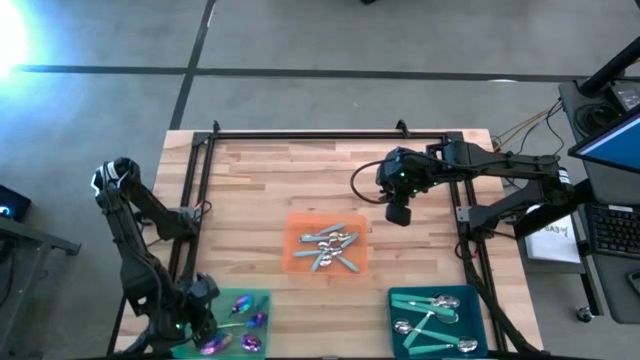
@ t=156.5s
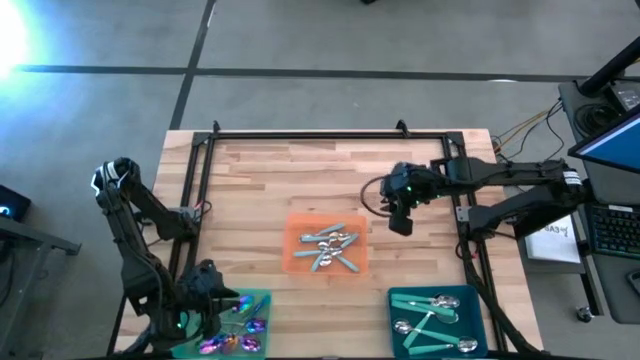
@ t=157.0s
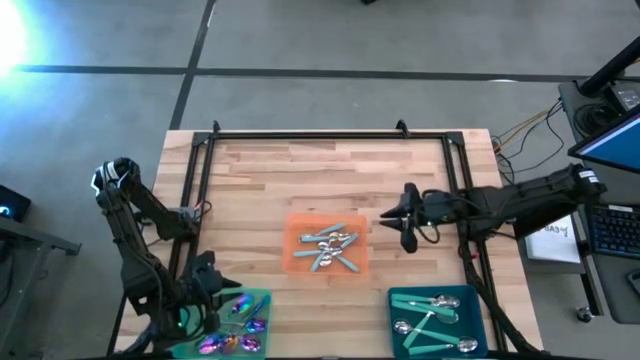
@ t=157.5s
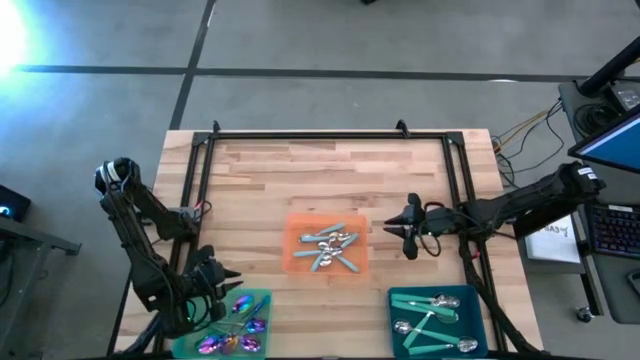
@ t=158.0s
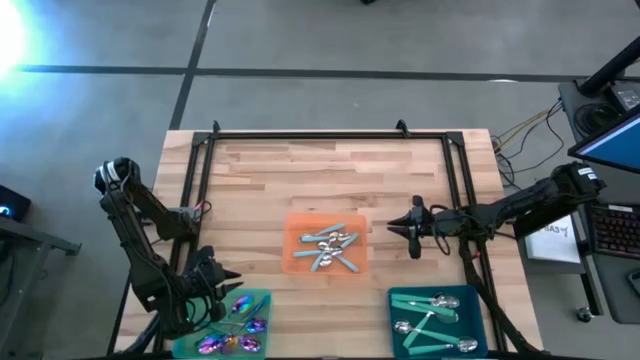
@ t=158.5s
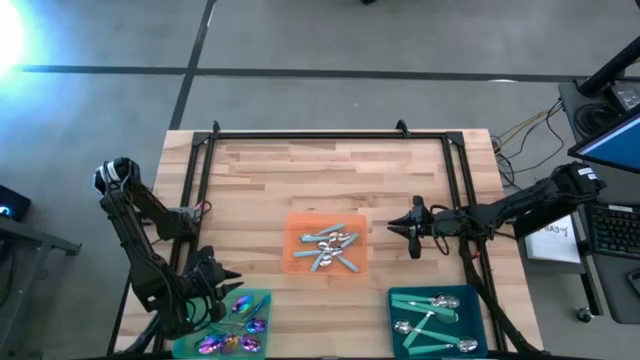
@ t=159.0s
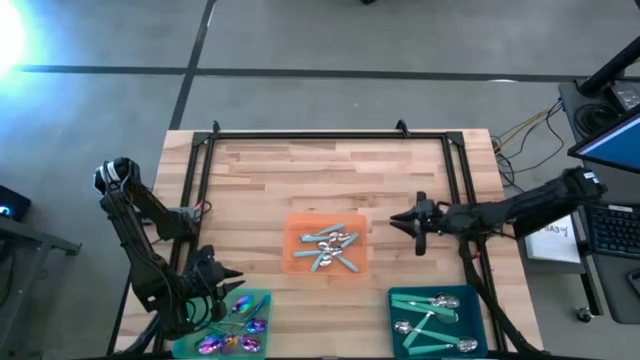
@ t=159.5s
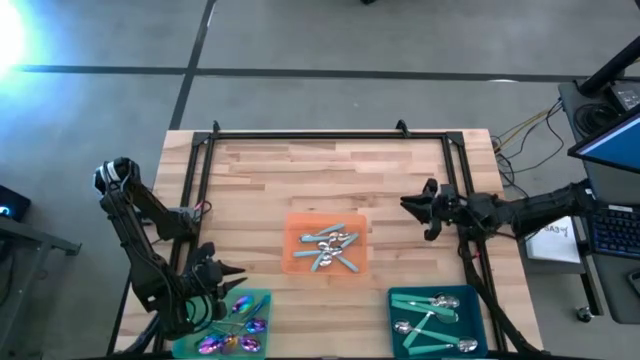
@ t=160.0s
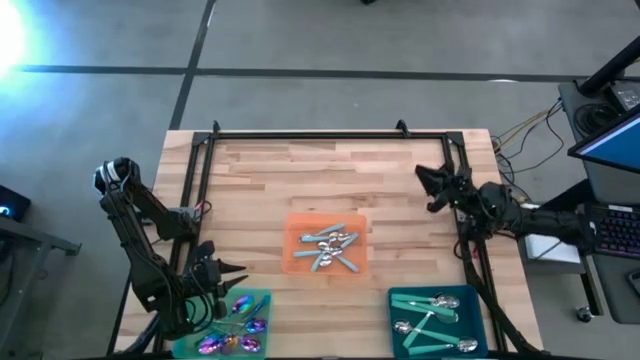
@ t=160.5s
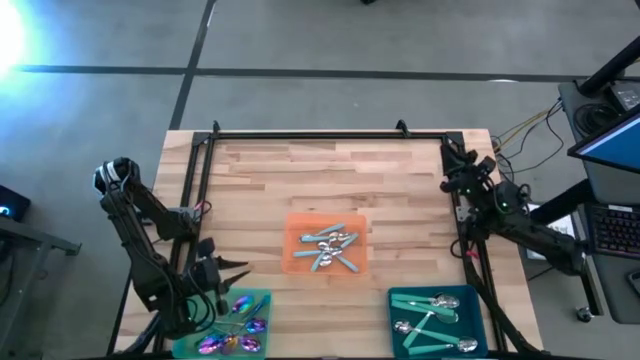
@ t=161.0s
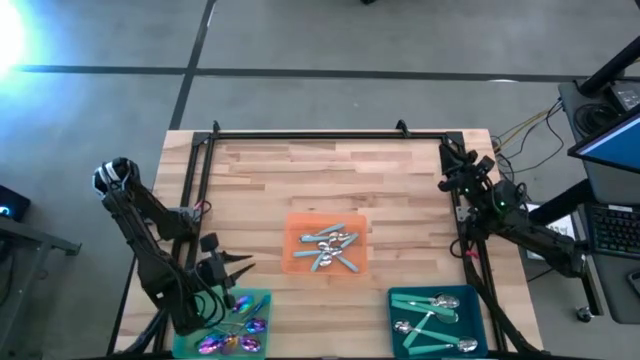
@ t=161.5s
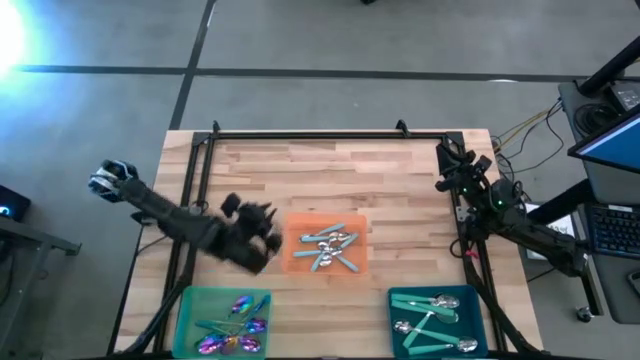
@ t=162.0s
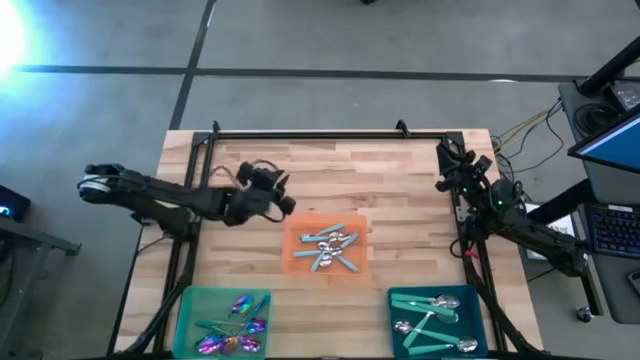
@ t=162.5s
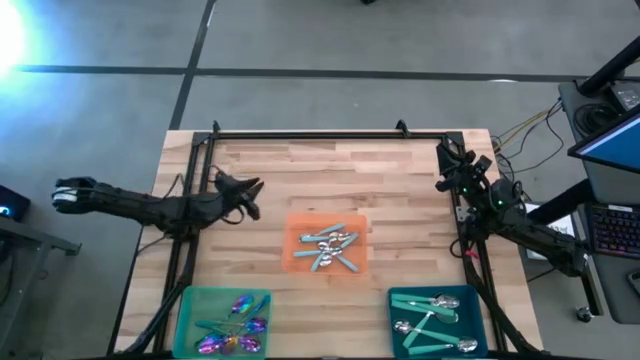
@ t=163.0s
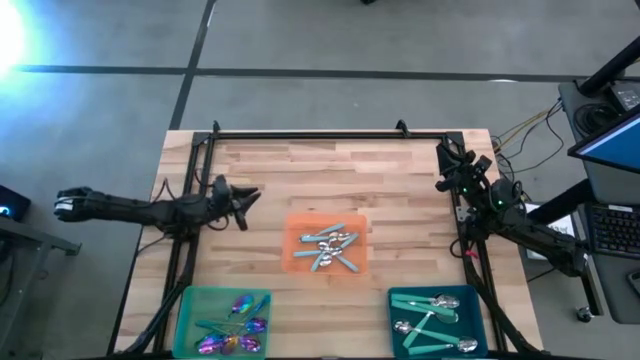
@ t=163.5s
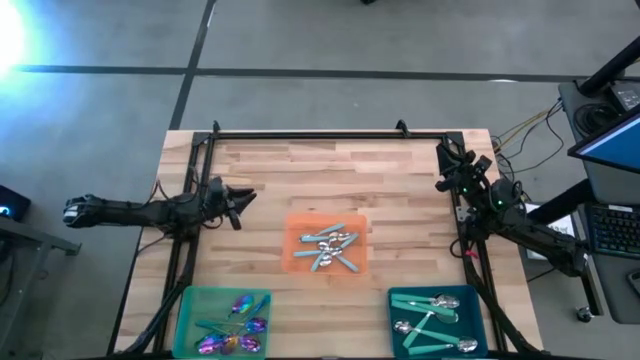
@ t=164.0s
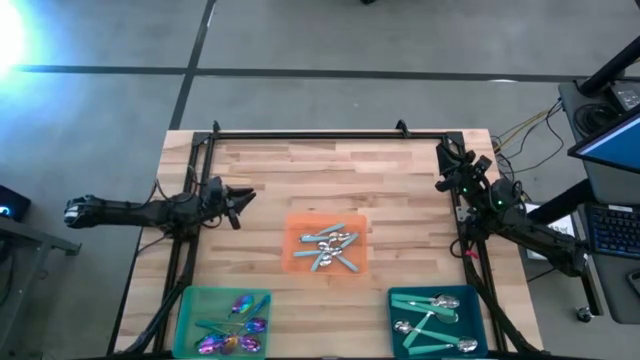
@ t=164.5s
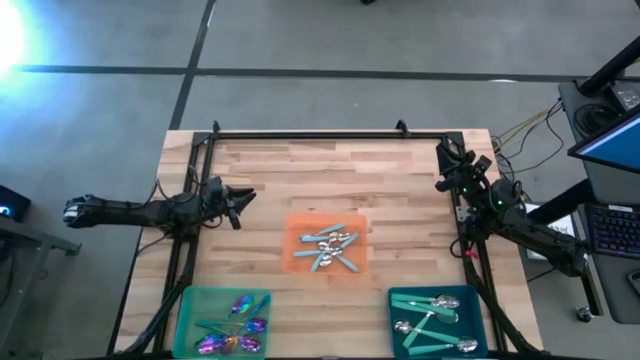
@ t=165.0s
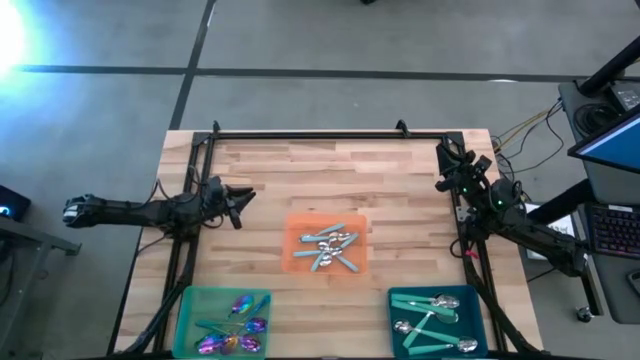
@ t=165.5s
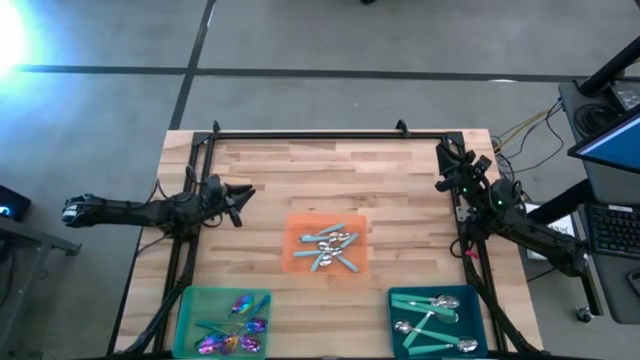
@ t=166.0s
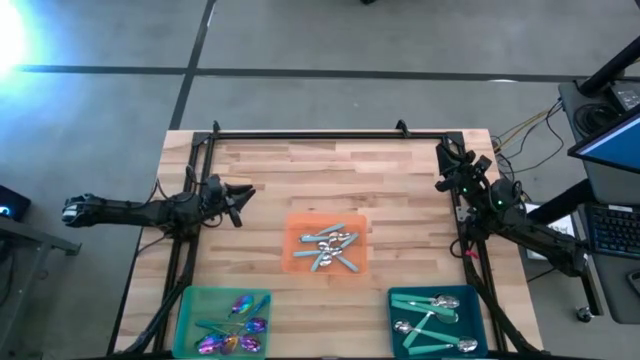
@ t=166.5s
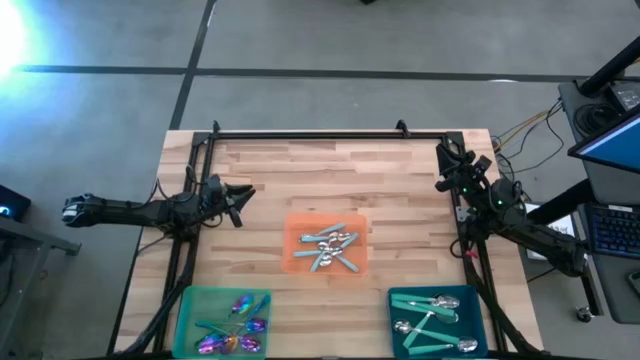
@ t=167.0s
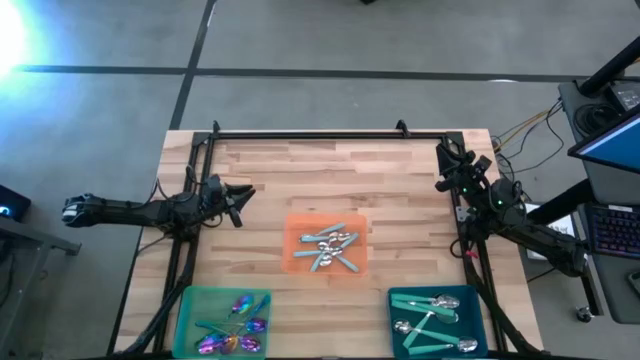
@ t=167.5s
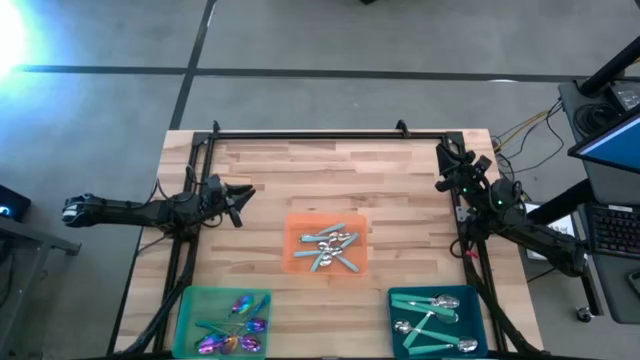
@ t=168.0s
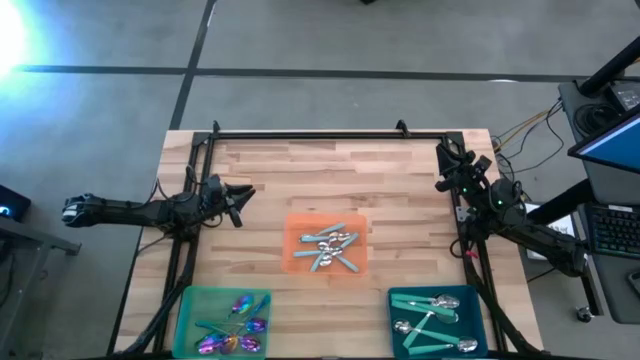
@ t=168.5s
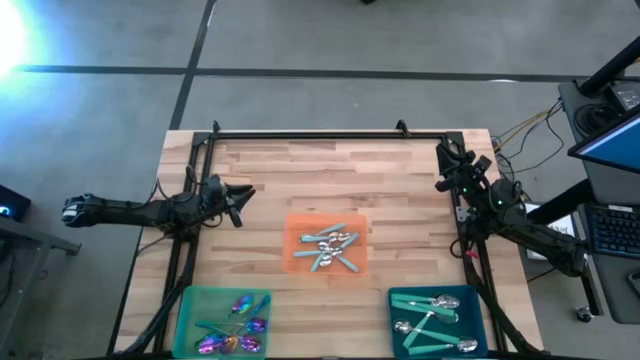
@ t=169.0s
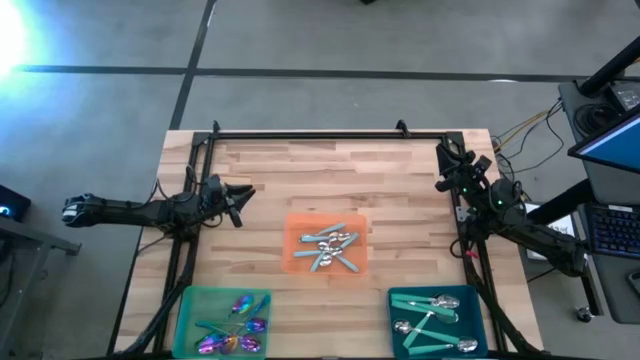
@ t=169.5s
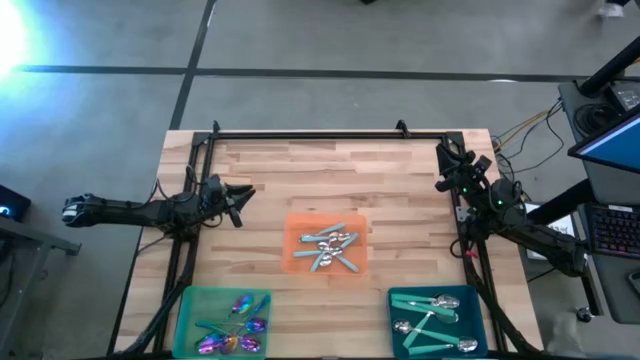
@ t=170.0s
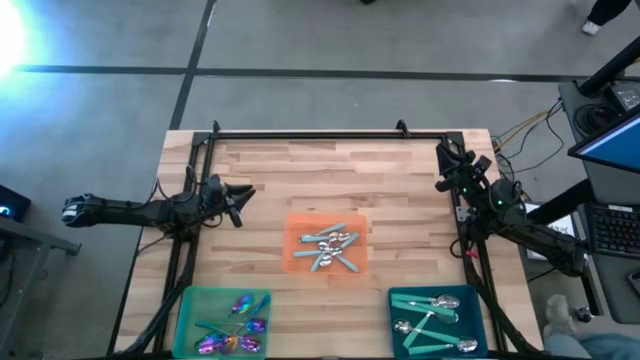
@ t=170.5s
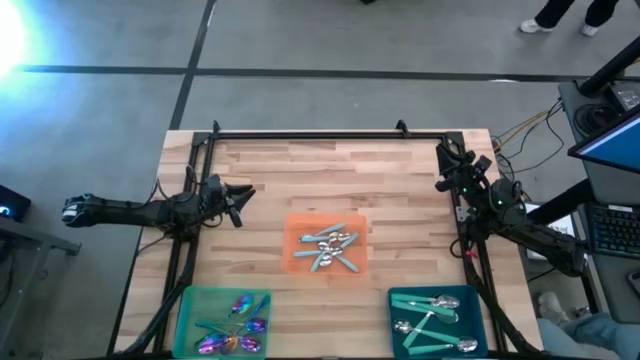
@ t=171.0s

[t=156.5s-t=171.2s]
Task: Sort silverware by color (type)
Return to Home Position

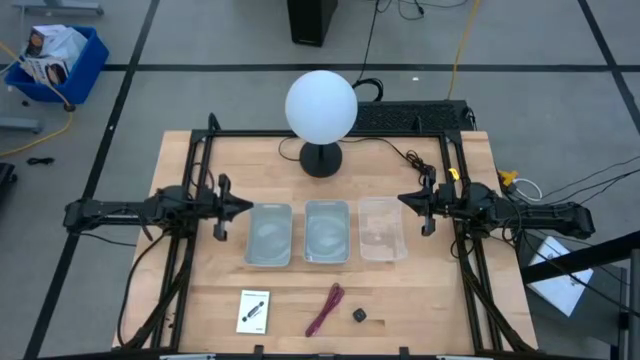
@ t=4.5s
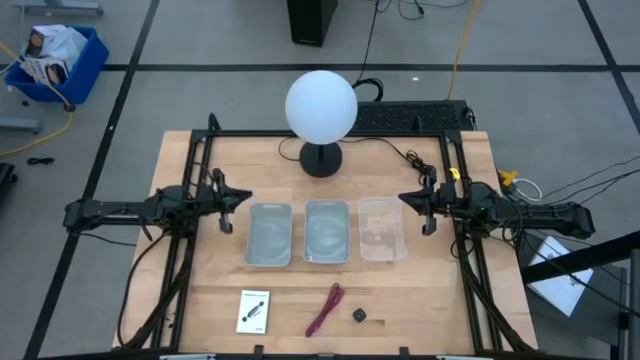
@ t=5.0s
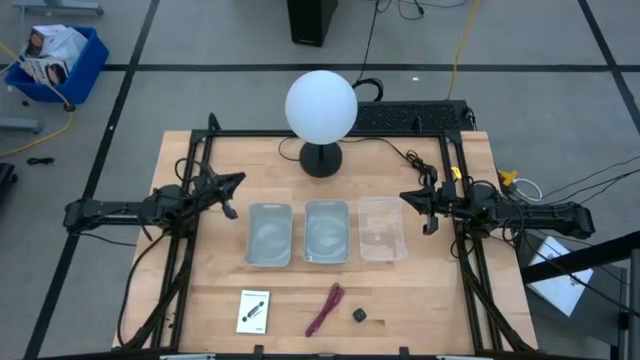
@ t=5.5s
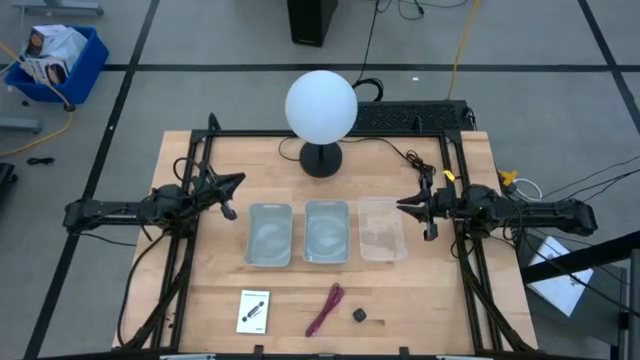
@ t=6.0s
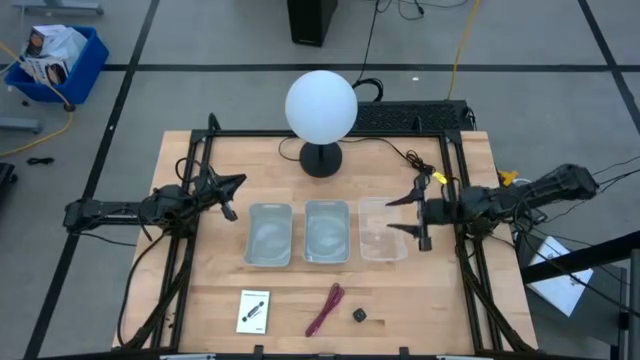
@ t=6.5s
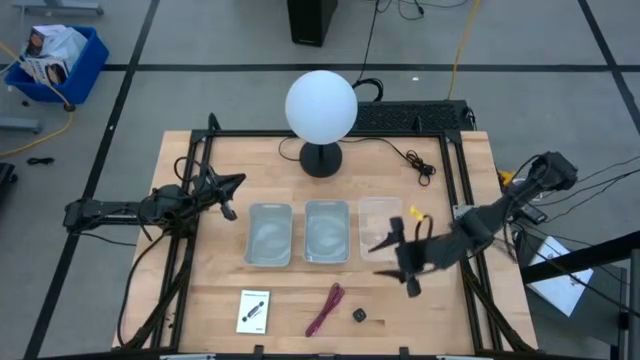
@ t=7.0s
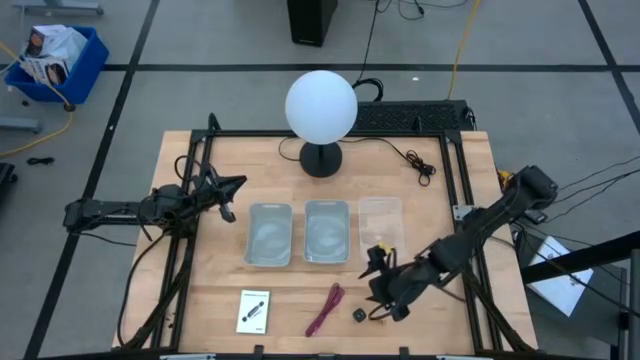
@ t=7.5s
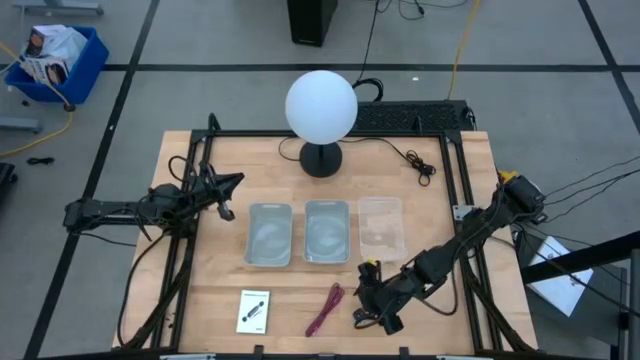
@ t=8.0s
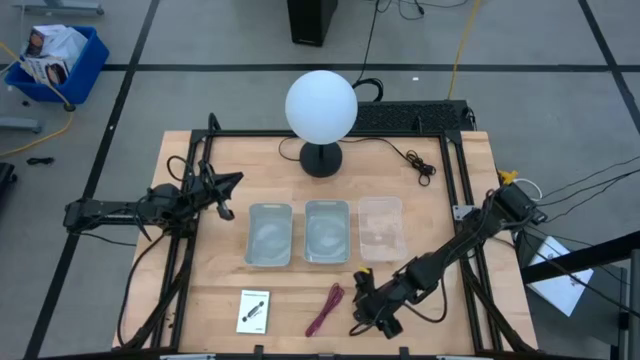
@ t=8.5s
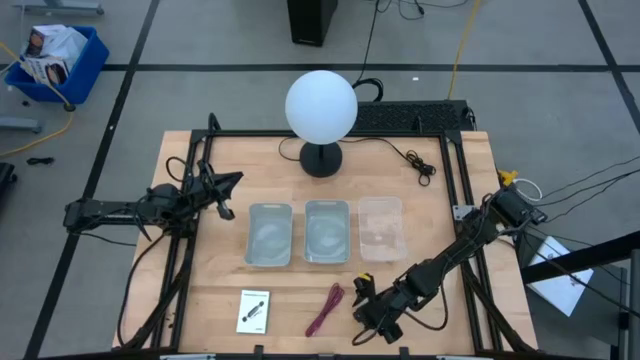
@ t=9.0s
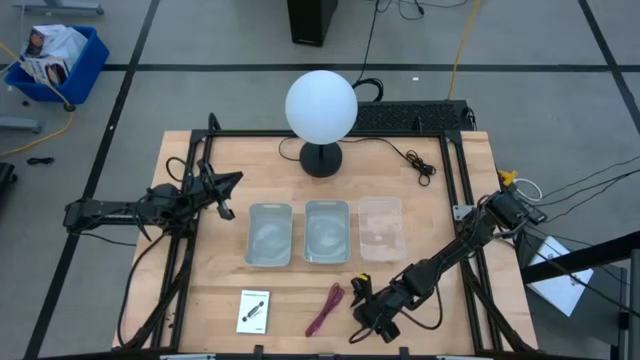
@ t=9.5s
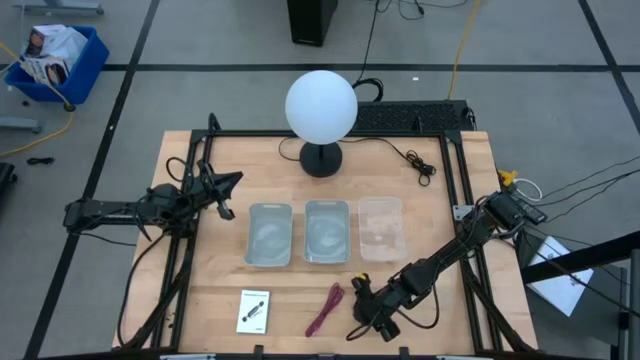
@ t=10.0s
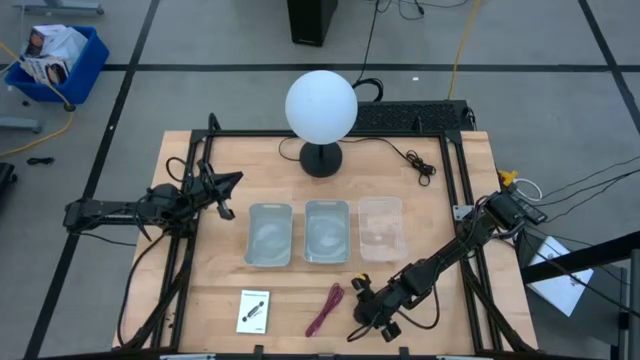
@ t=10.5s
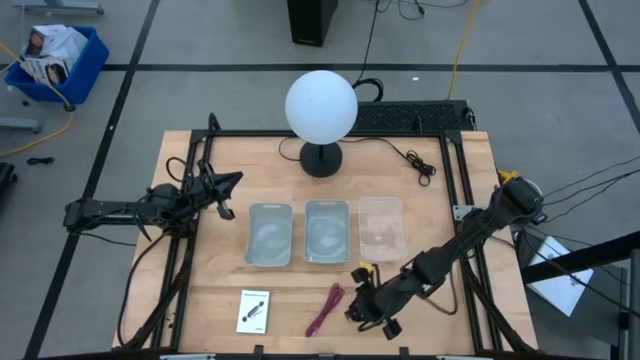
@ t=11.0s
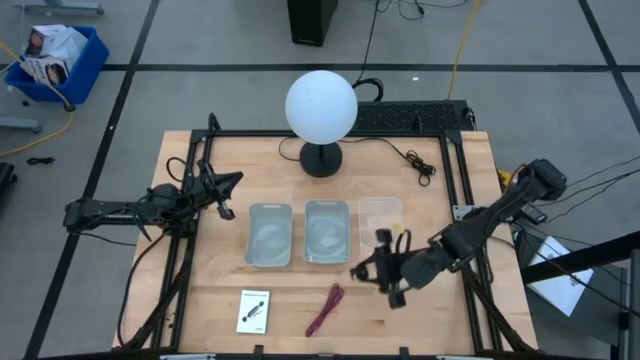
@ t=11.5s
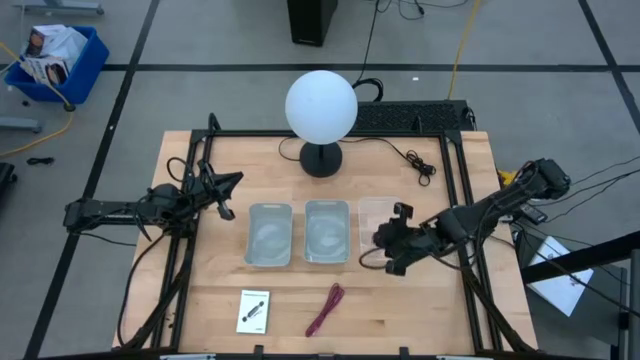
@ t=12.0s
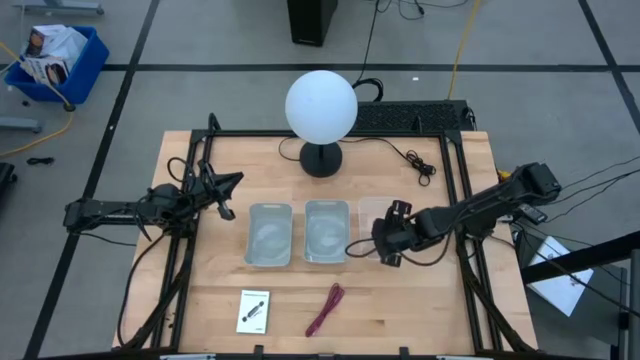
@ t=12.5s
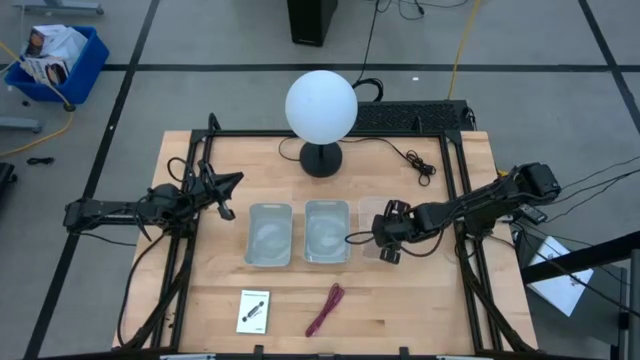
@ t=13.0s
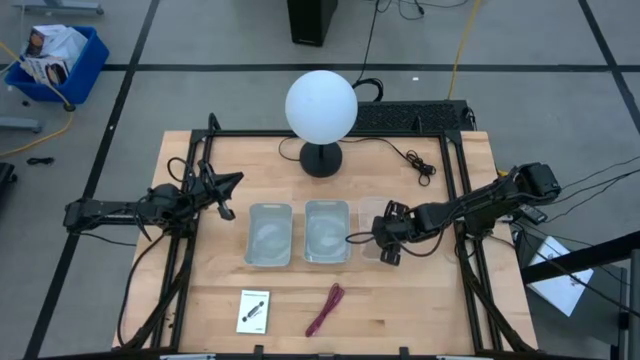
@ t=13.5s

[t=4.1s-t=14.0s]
Task: Pick and place items into bin
Put the black charger adapter into the transparent bin
